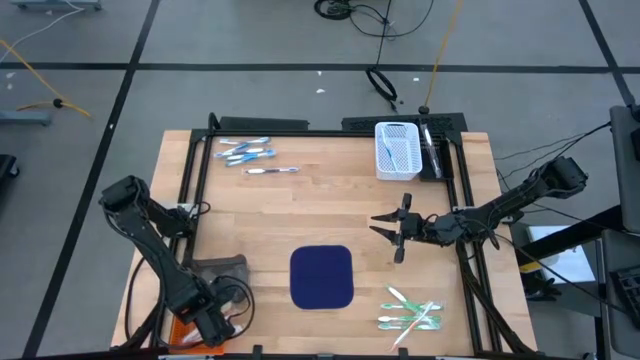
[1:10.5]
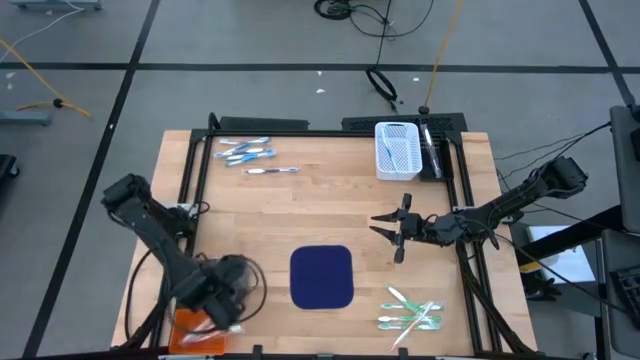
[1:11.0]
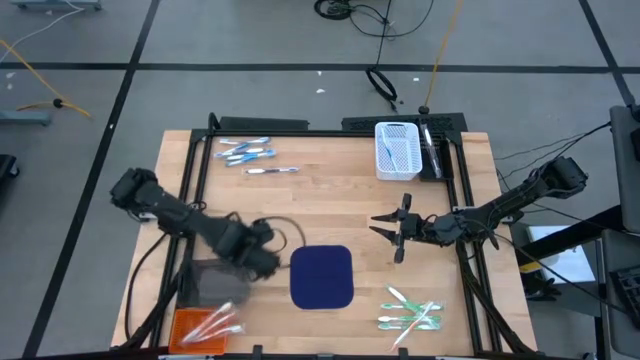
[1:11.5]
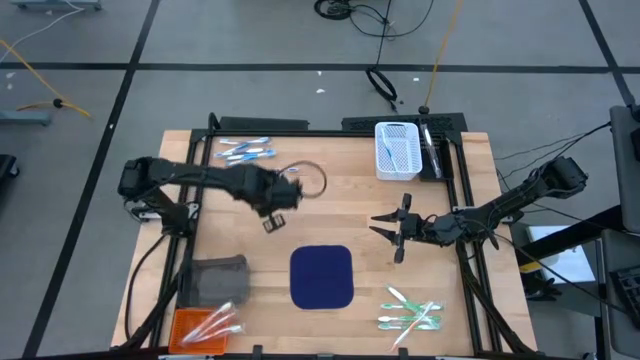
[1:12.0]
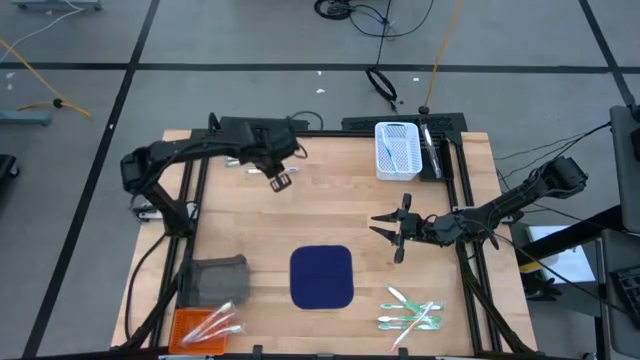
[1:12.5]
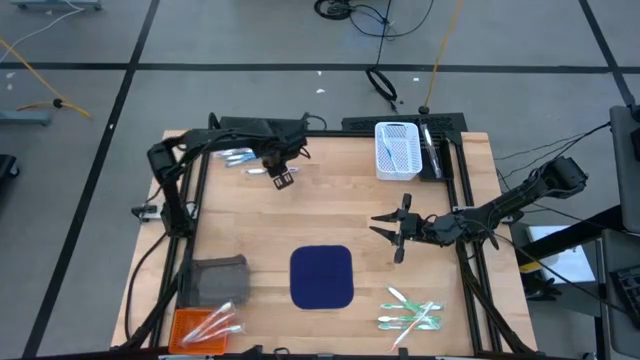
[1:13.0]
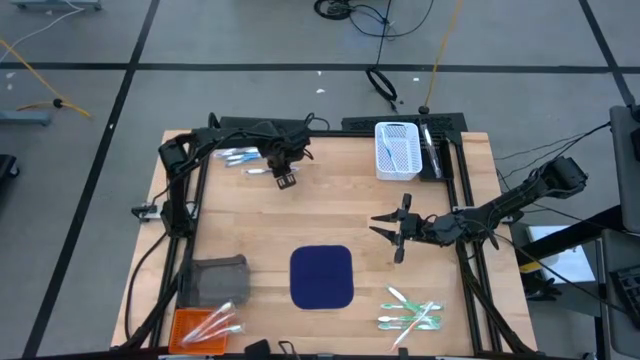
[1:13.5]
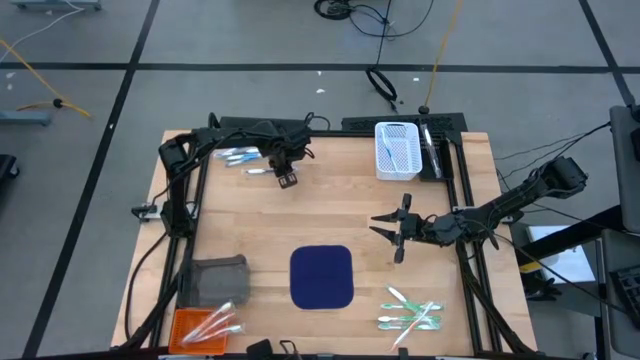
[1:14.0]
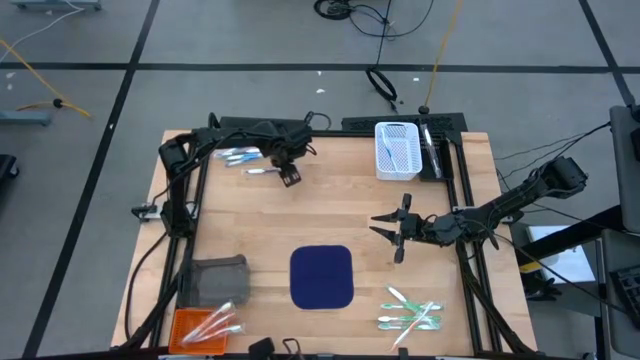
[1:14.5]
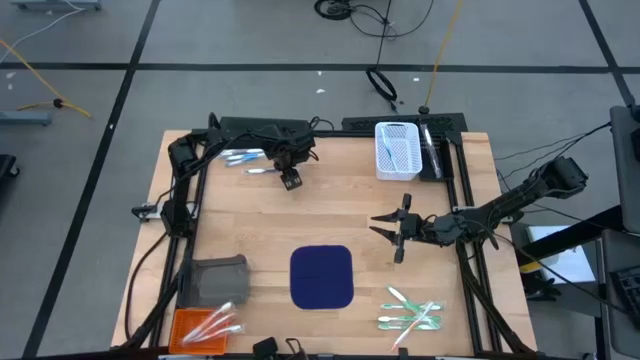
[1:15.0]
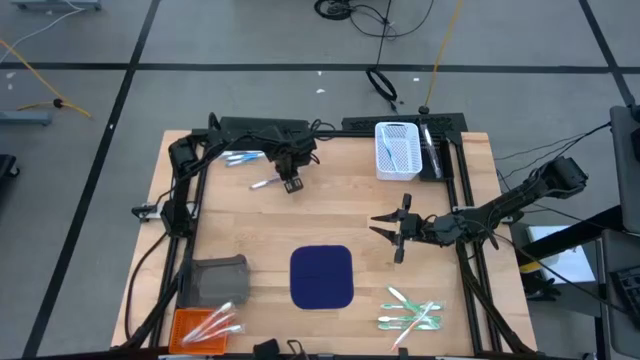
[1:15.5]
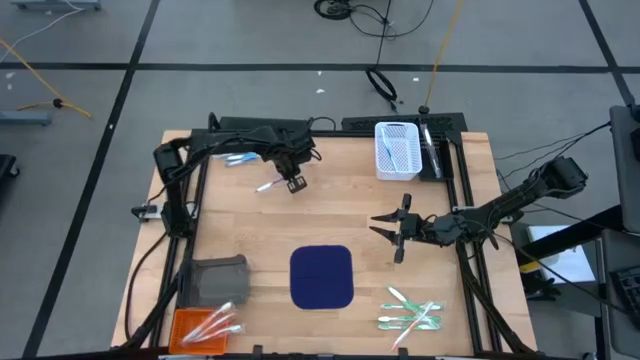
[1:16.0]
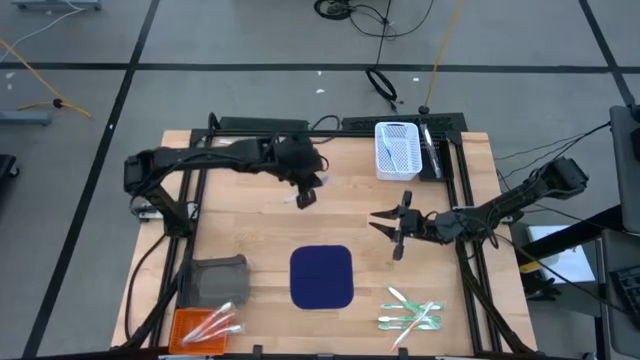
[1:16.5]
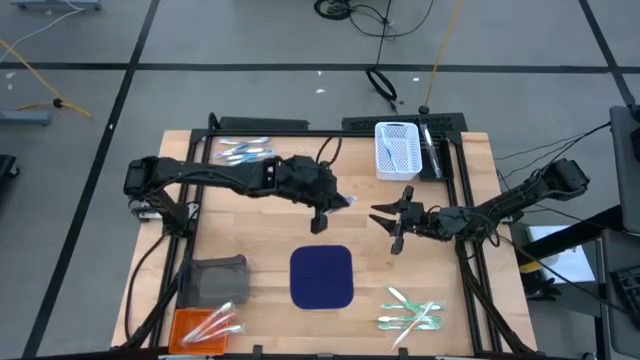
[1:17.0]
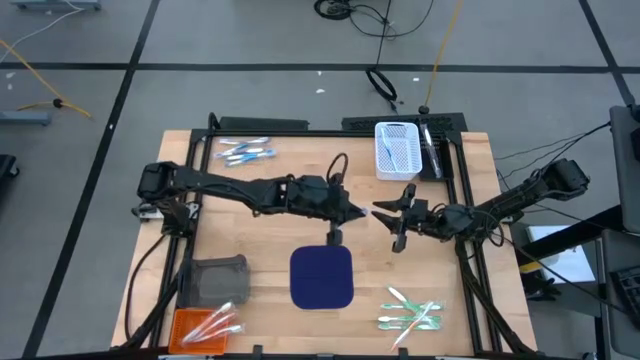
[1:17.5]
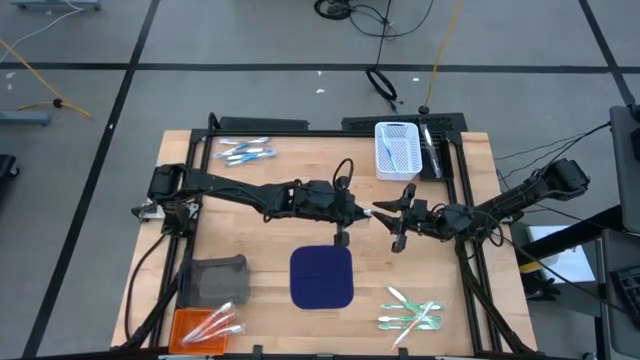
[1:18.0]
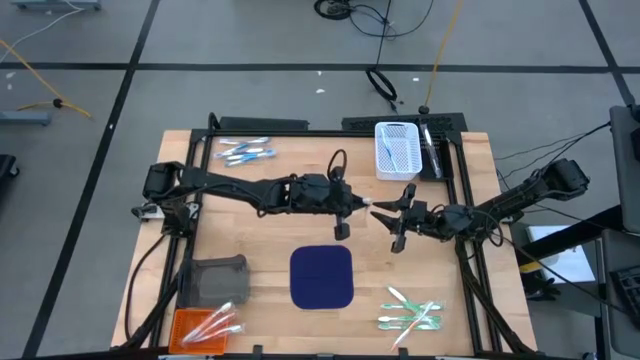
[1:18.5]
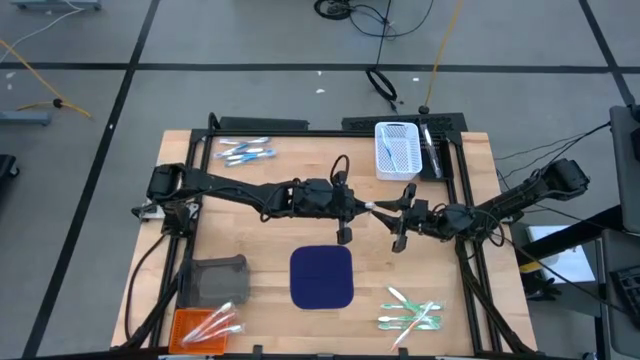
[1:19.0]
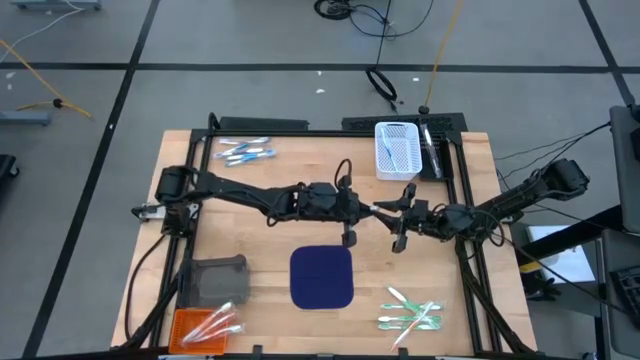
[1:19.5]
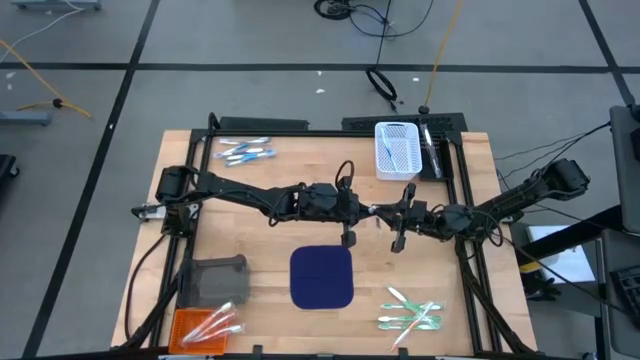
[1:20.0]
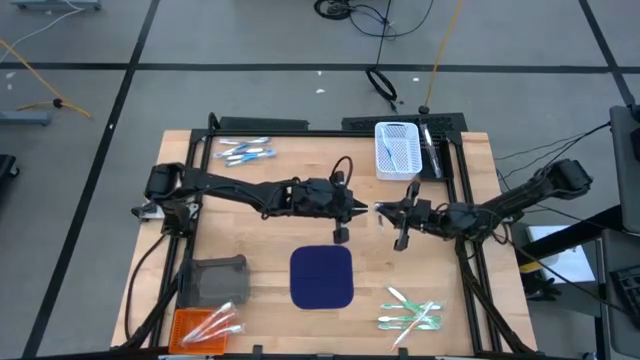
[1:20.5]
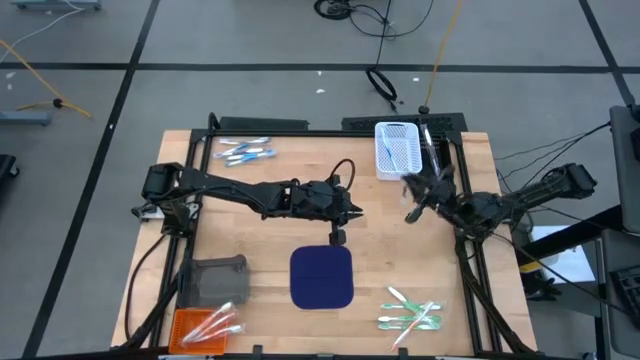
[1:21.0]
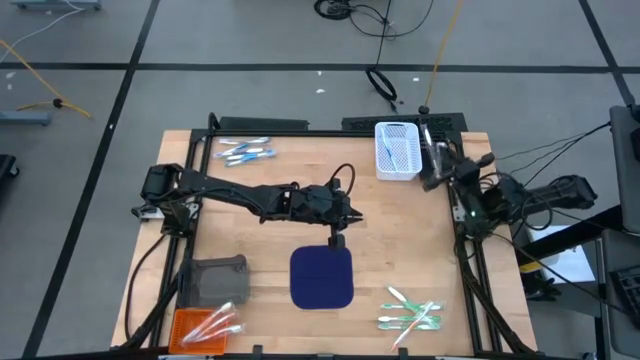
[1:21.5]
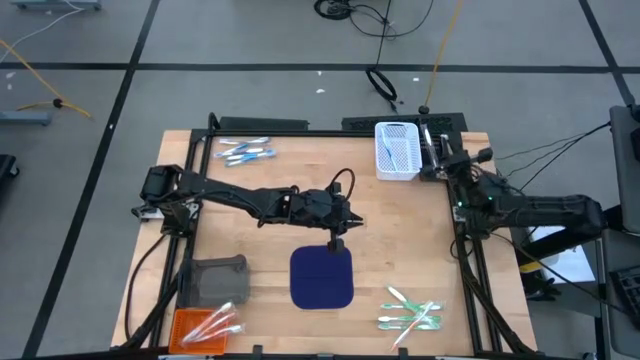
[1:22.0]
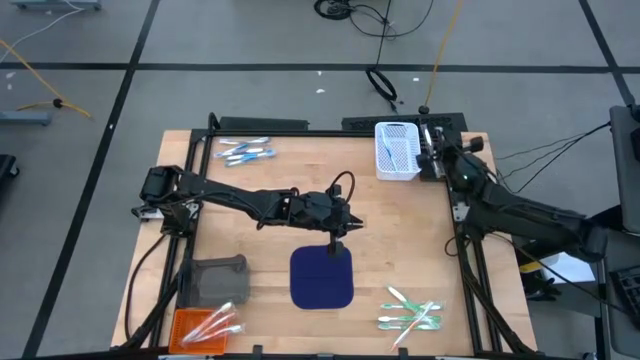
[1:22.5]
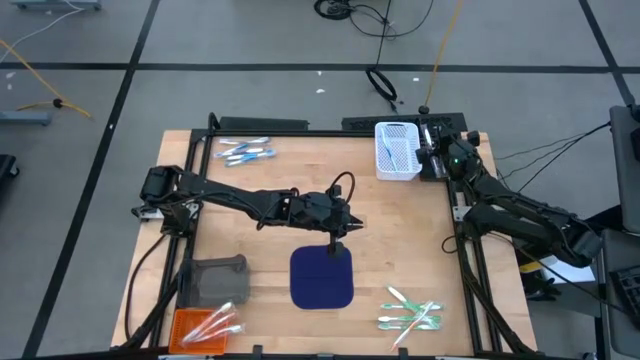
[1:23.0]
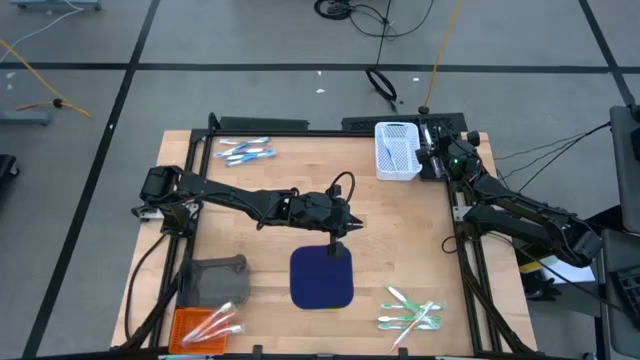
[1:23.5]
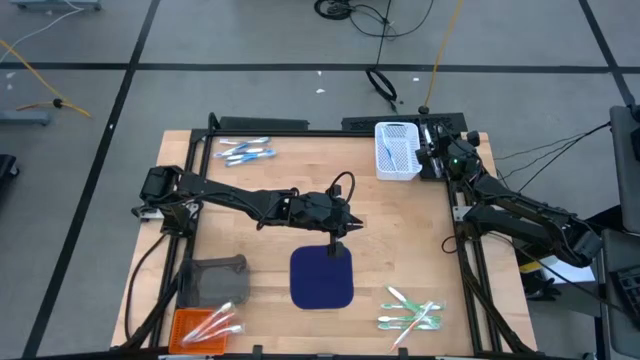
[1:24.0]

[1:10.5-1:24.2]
Task: Pick & Place Toothbrushes
Put the violet toothbrush into the black basket

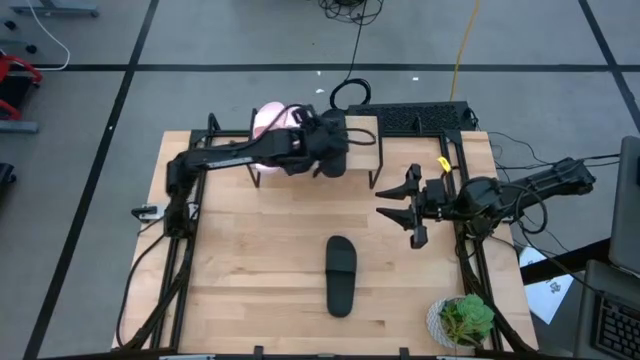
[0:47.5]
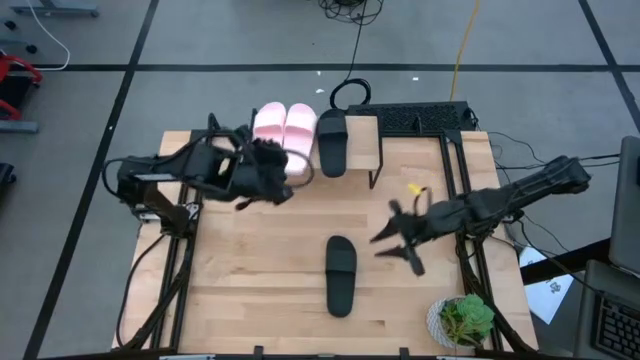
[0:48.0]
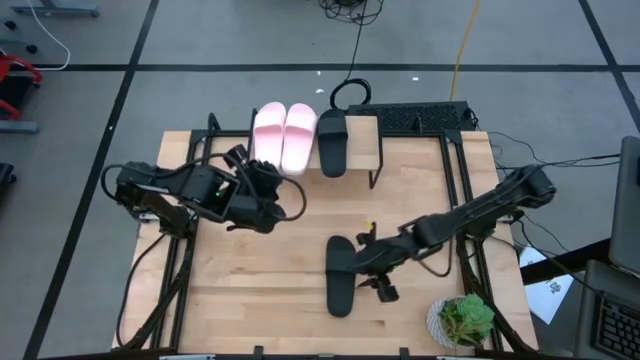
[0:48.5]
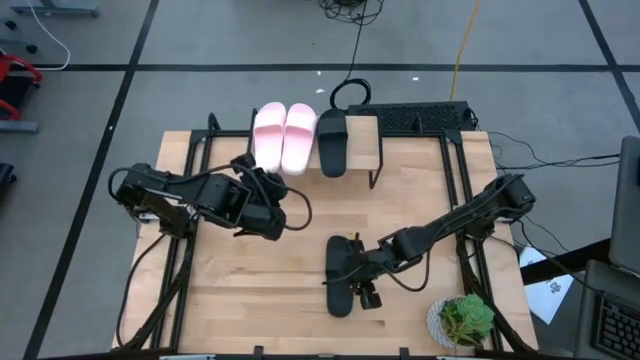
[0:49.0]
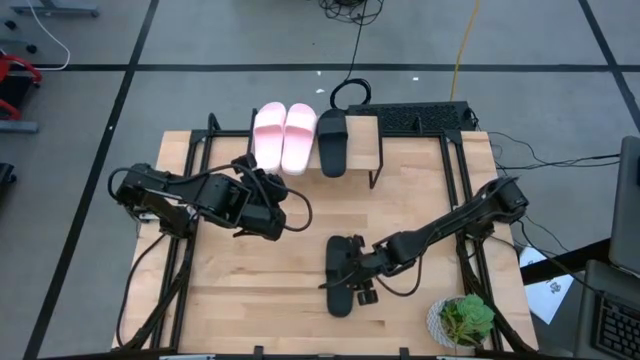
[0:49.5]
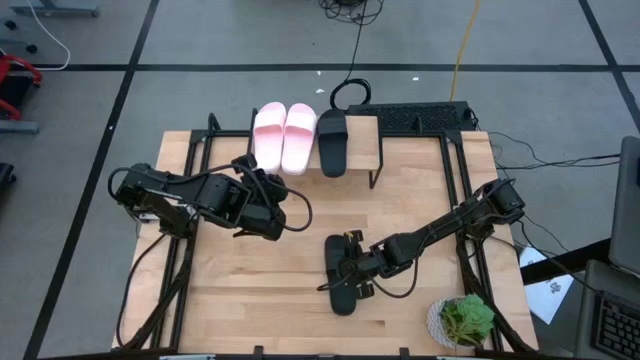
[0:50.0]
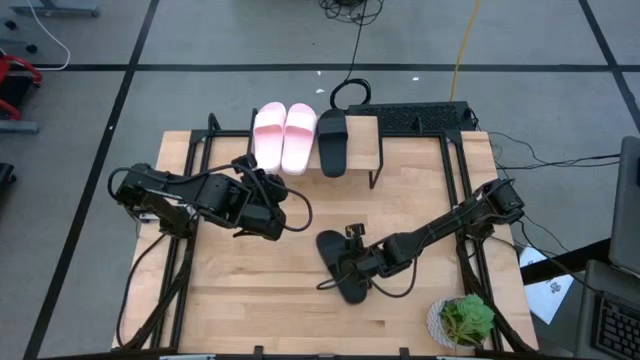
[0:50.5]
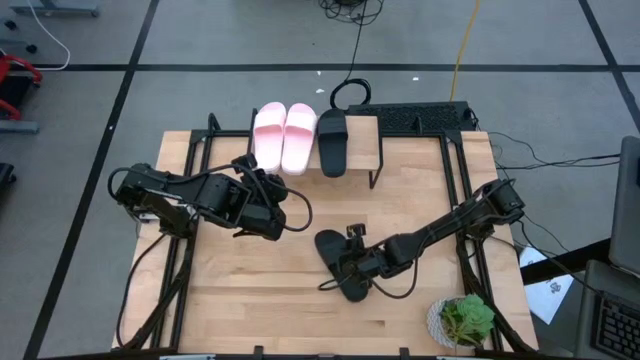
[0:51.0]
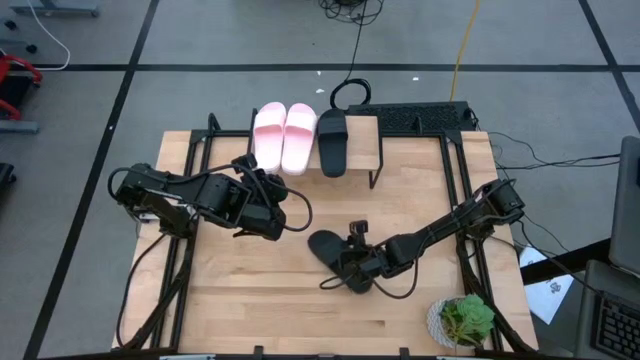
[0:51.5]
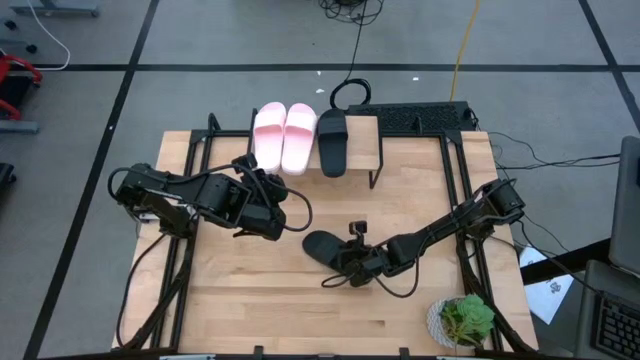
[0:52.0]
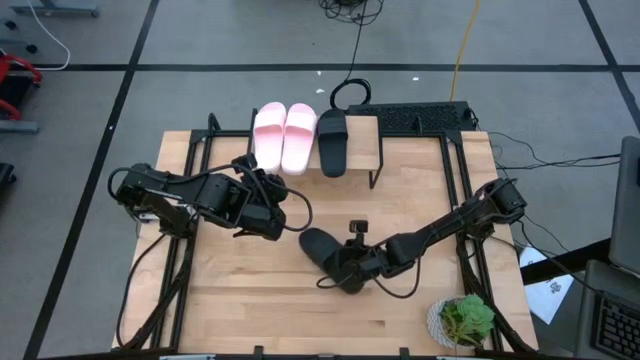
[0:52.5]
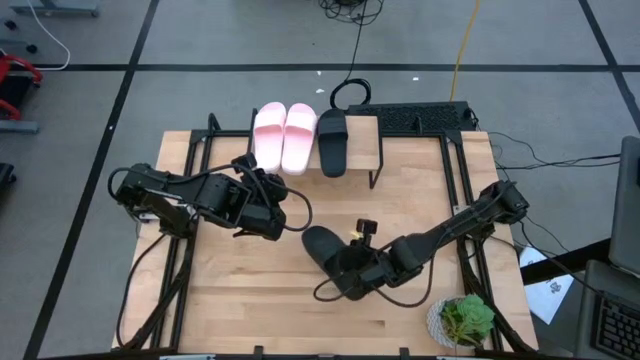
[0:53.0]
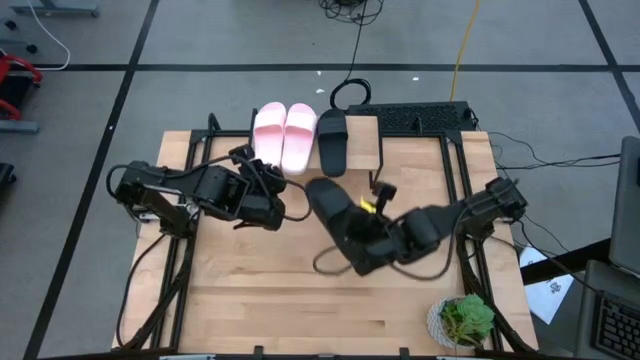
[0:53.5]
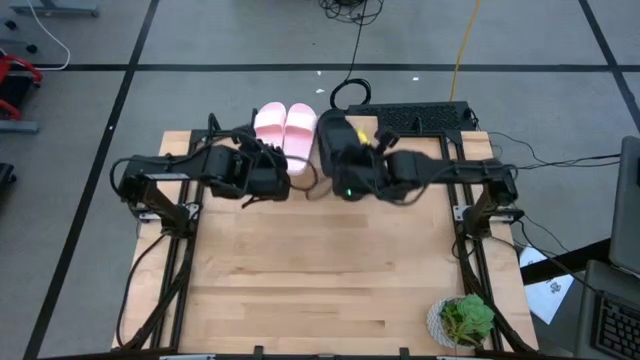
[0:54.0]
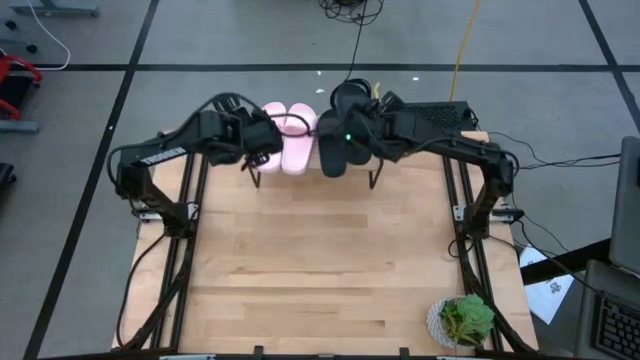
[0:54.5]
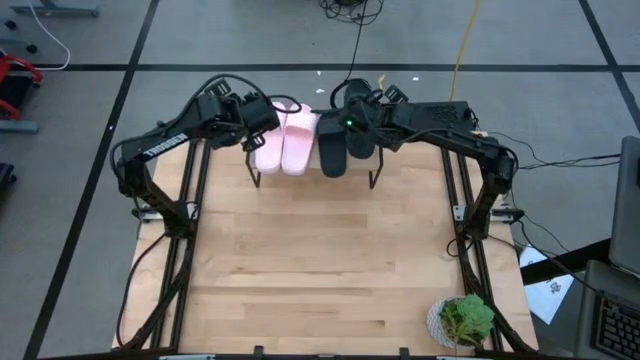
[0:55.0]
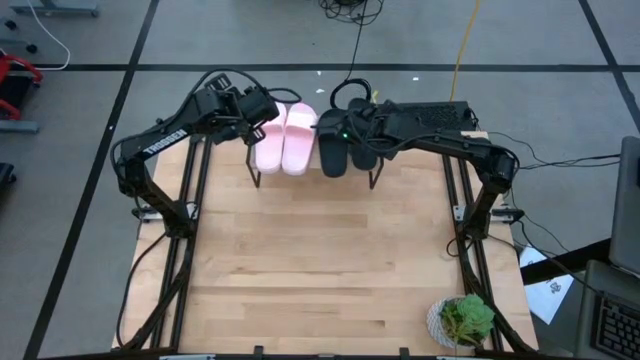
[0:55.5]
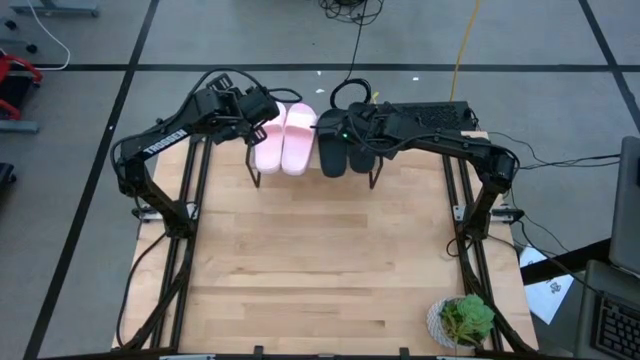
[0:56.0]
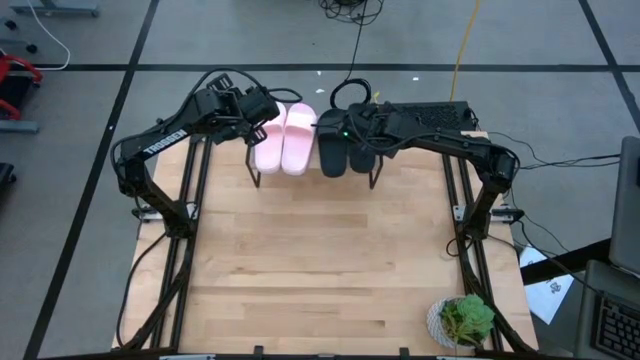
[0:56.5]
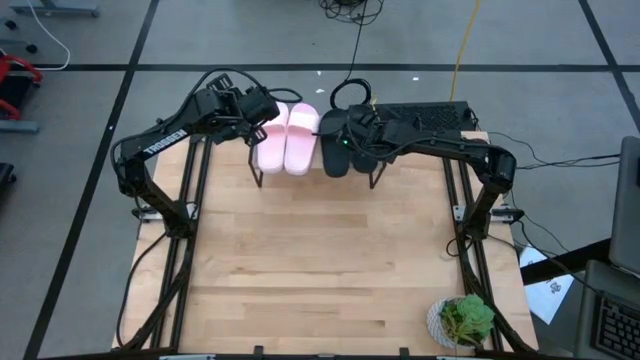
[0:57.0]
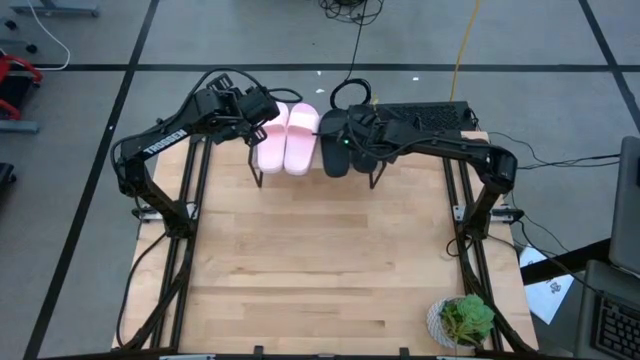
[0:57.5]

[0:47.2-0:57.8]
Task: Pick and place slides into the shelf
Put the black slide on the shelf
